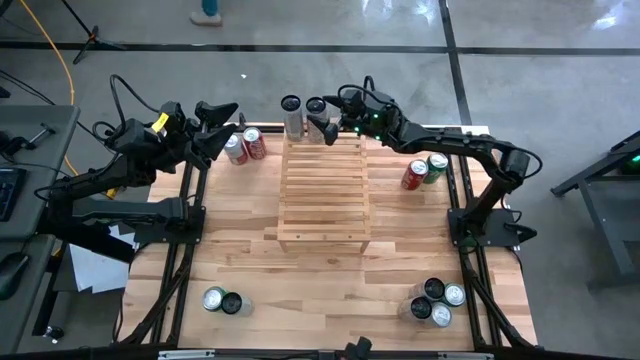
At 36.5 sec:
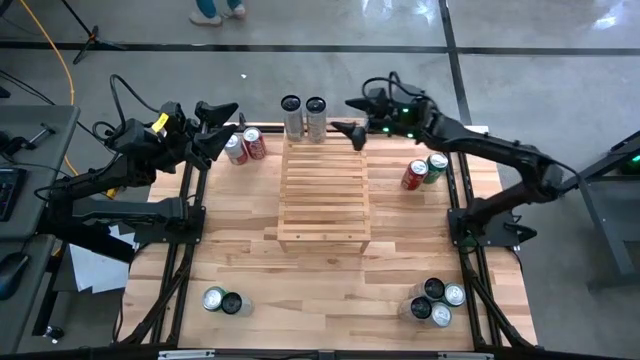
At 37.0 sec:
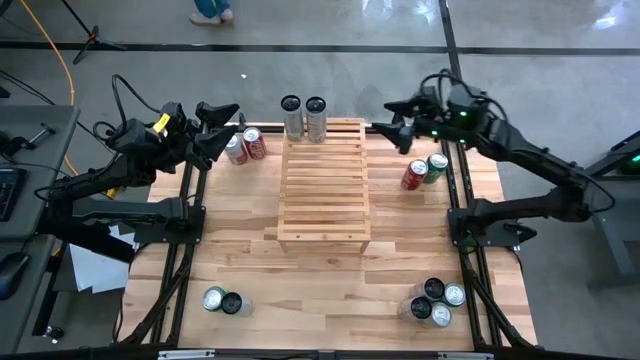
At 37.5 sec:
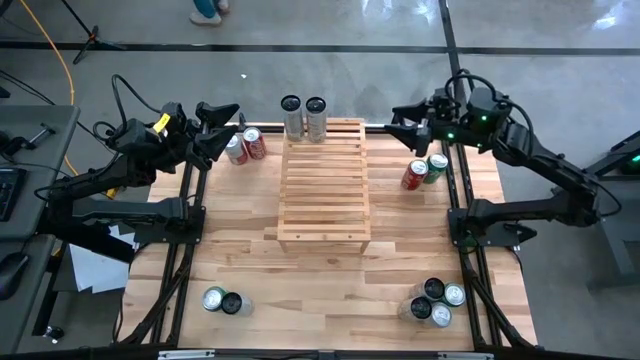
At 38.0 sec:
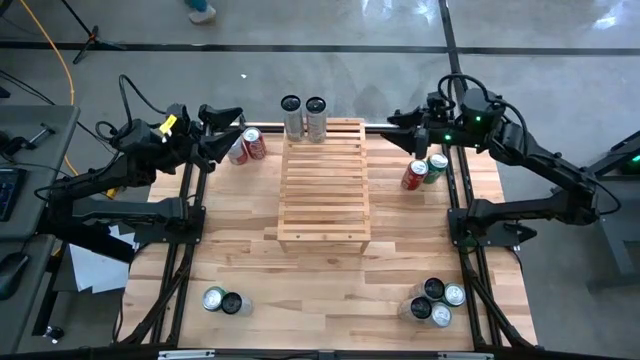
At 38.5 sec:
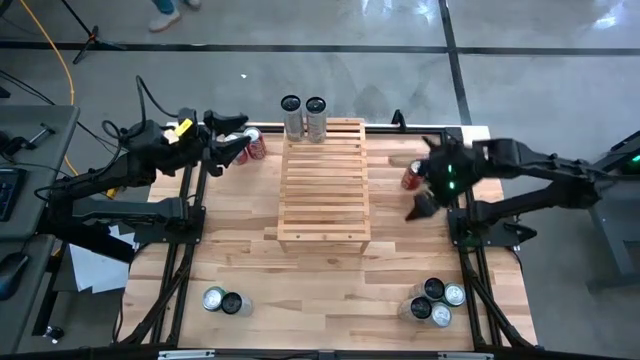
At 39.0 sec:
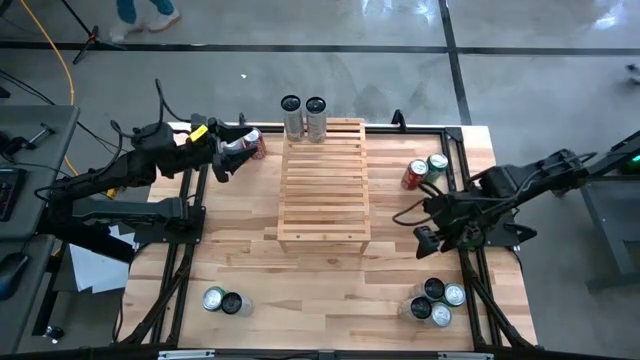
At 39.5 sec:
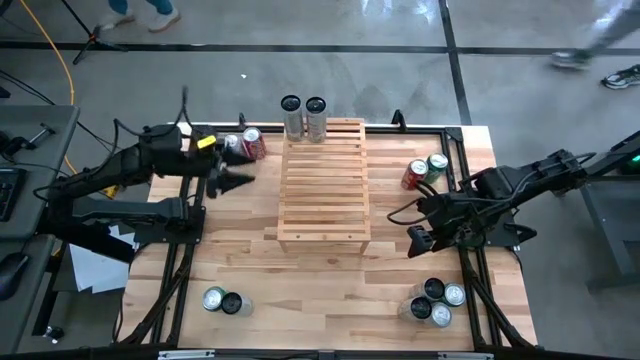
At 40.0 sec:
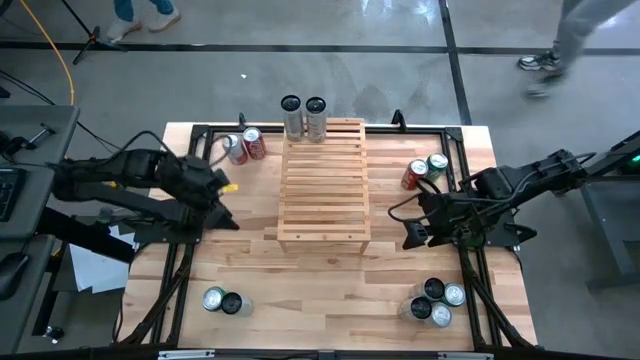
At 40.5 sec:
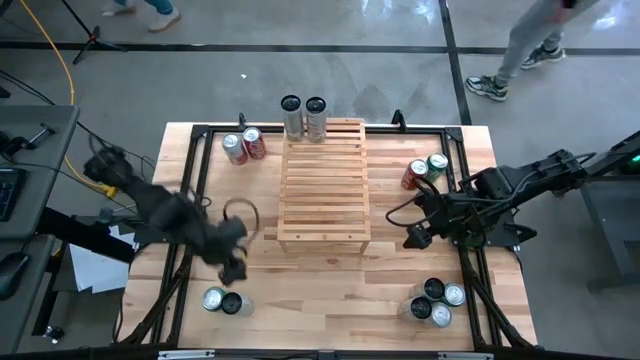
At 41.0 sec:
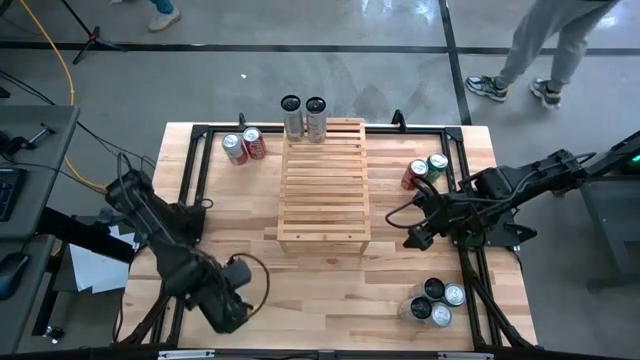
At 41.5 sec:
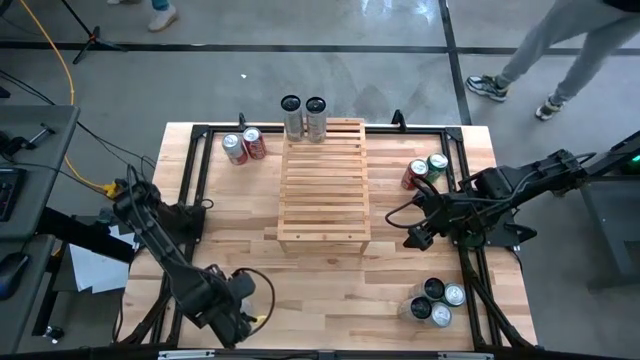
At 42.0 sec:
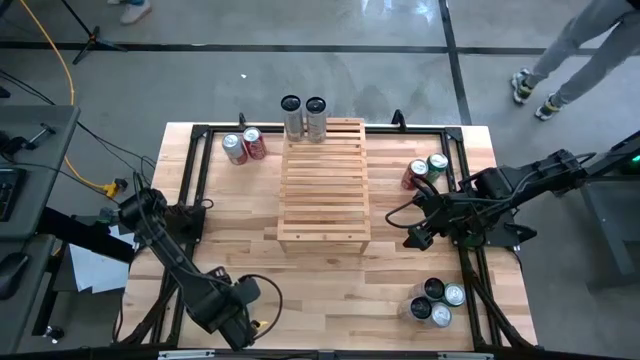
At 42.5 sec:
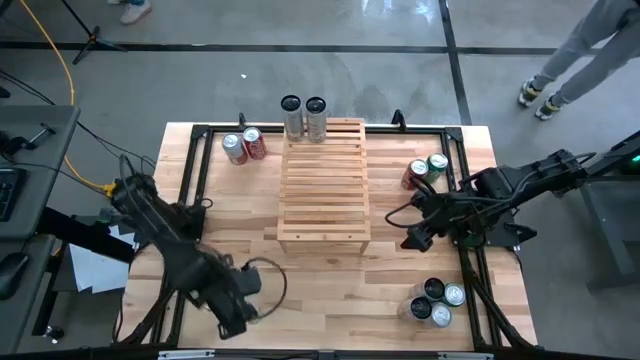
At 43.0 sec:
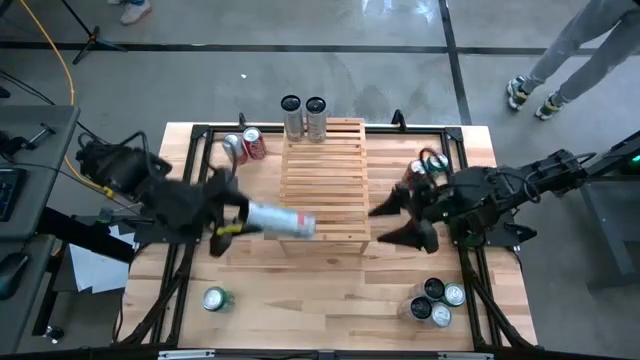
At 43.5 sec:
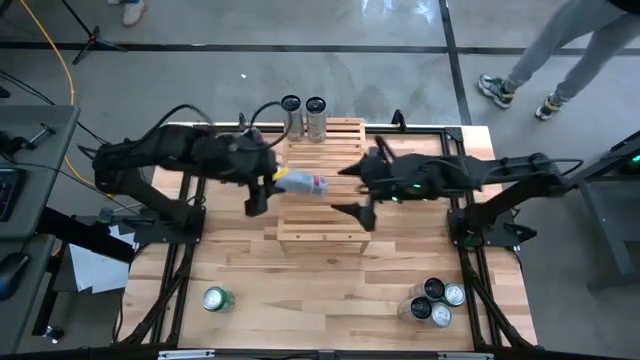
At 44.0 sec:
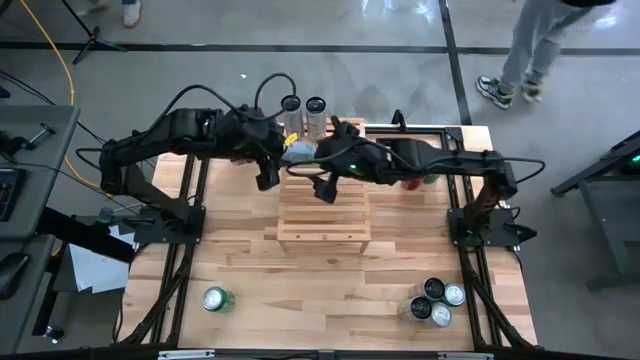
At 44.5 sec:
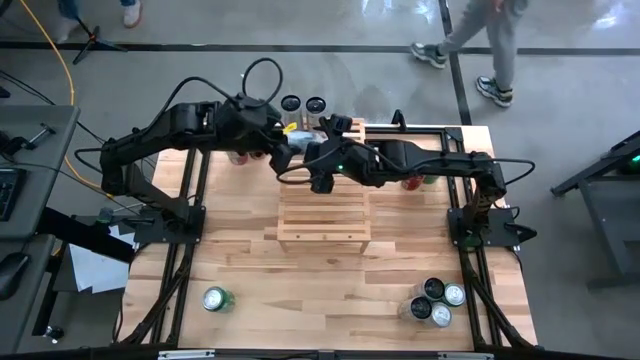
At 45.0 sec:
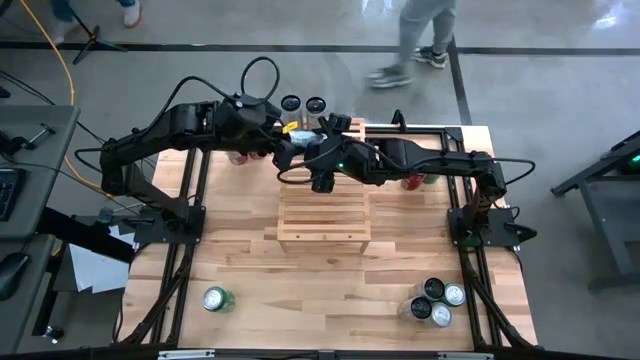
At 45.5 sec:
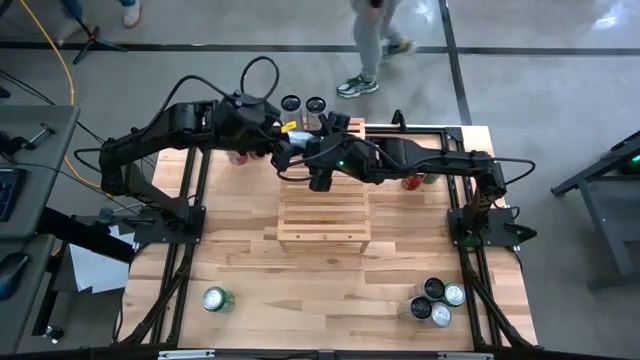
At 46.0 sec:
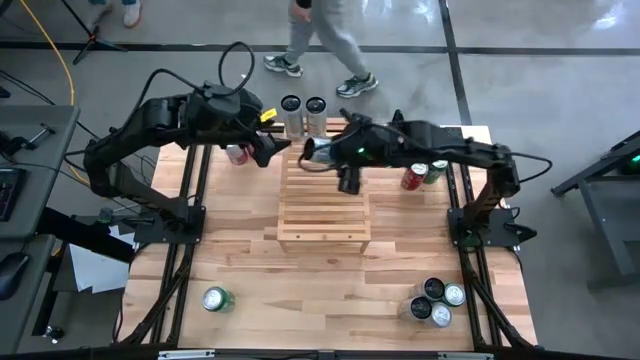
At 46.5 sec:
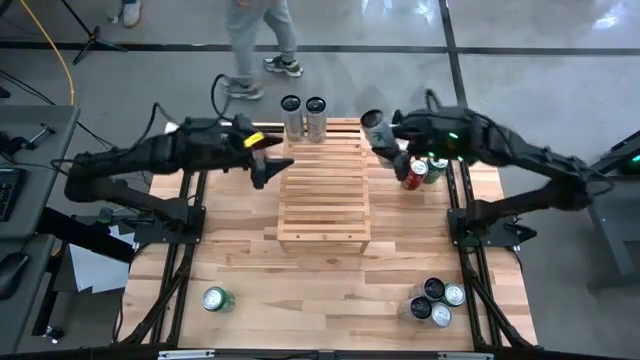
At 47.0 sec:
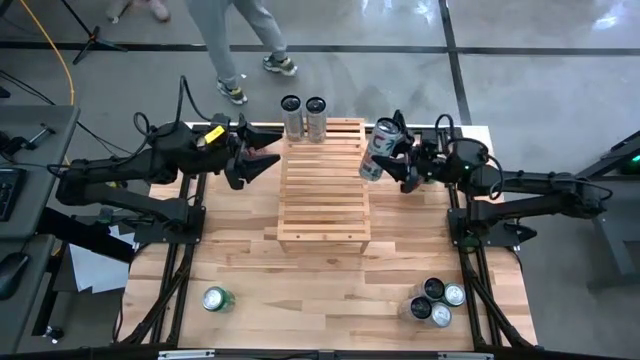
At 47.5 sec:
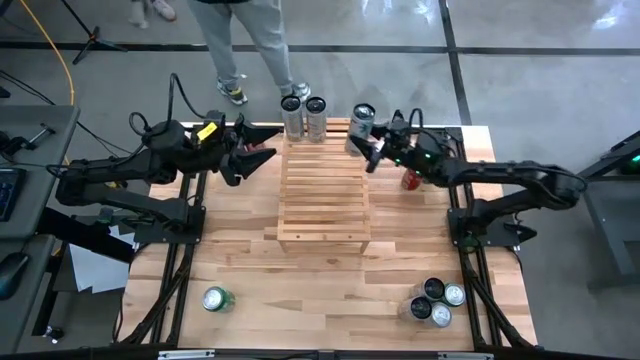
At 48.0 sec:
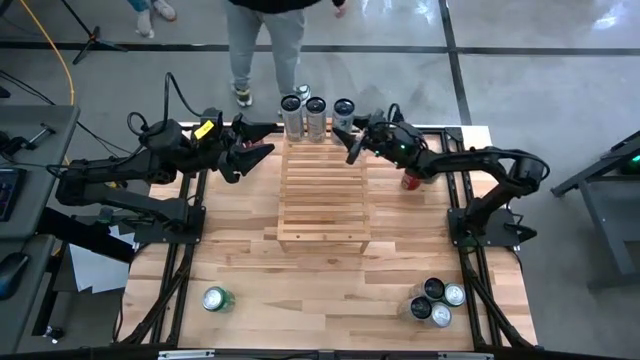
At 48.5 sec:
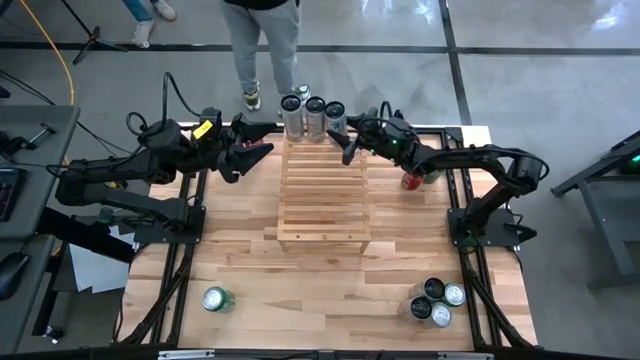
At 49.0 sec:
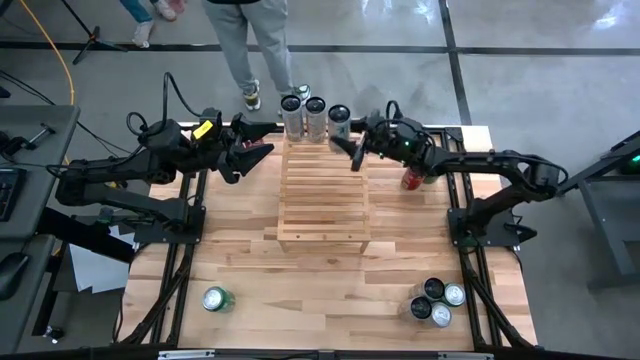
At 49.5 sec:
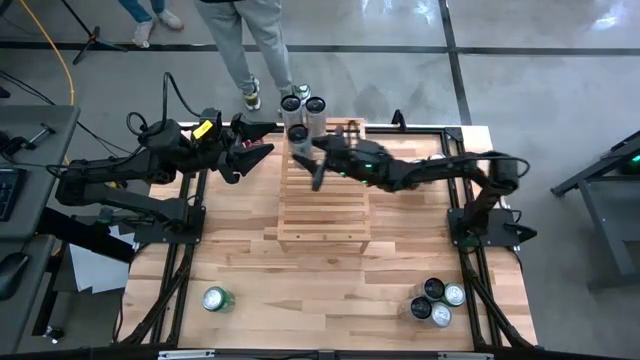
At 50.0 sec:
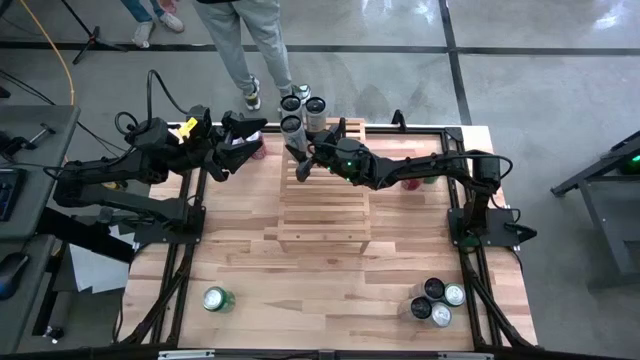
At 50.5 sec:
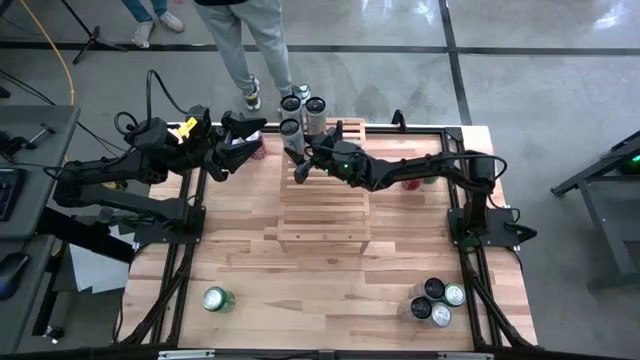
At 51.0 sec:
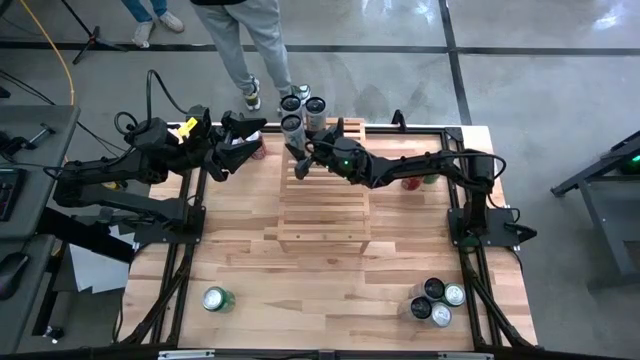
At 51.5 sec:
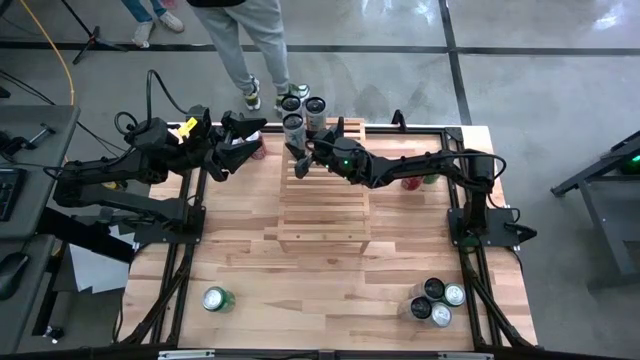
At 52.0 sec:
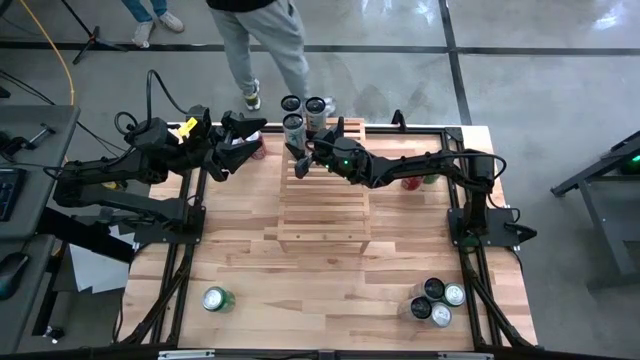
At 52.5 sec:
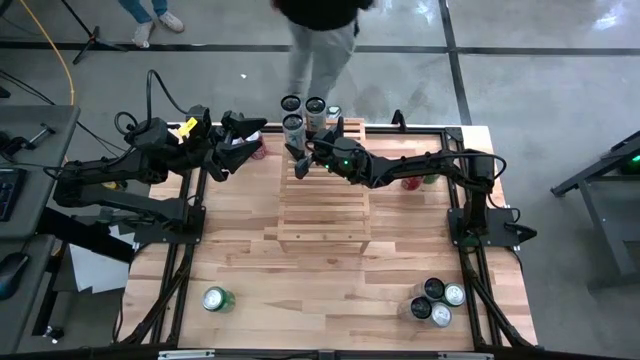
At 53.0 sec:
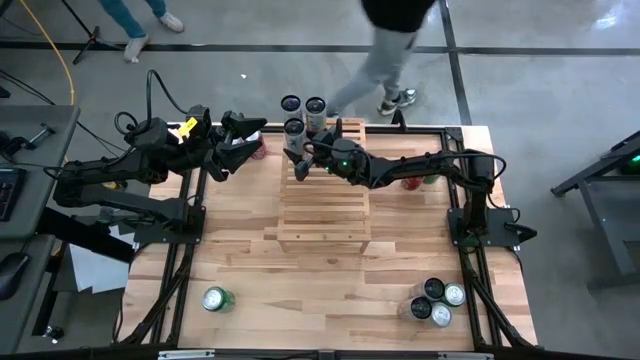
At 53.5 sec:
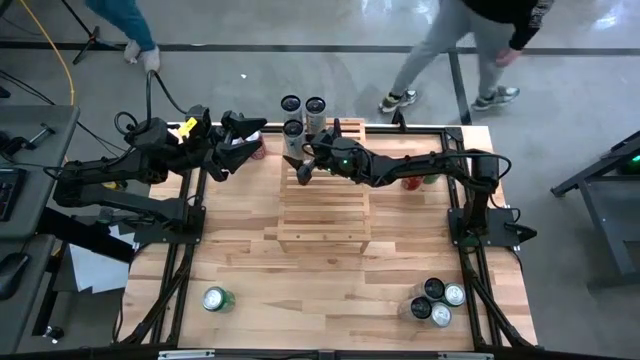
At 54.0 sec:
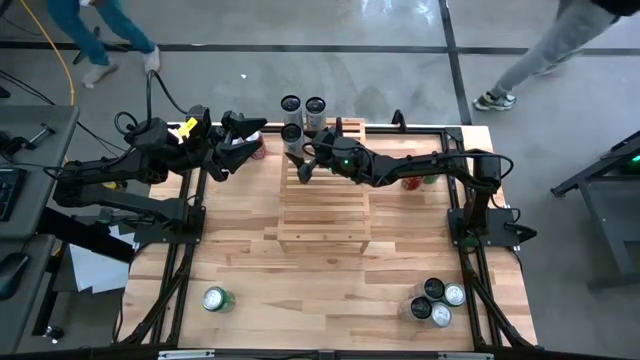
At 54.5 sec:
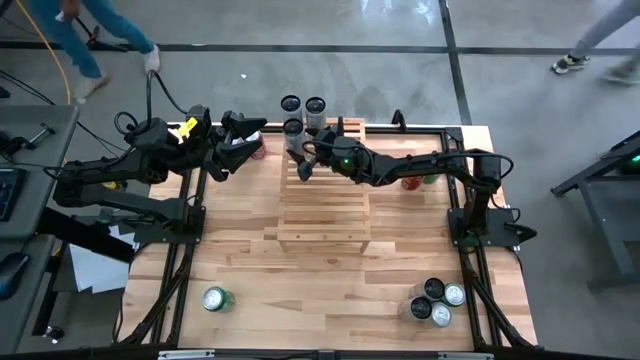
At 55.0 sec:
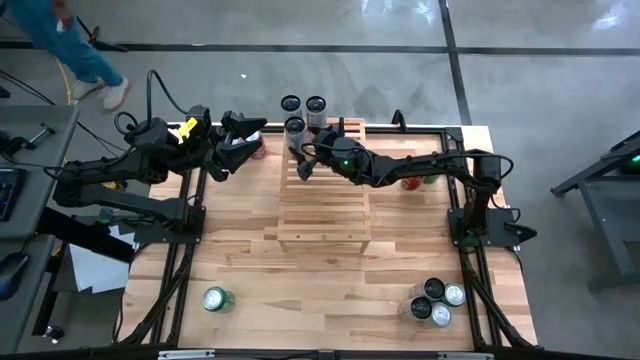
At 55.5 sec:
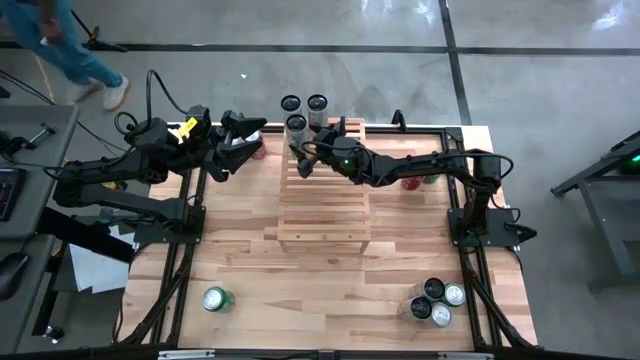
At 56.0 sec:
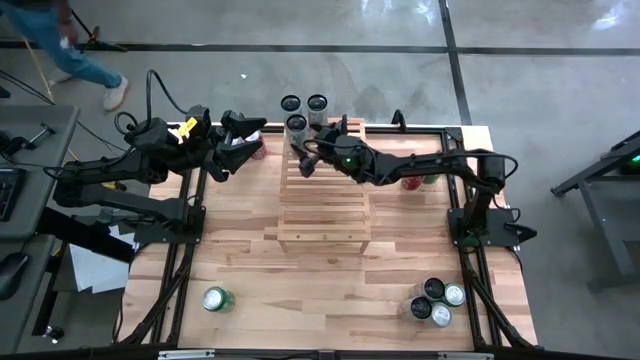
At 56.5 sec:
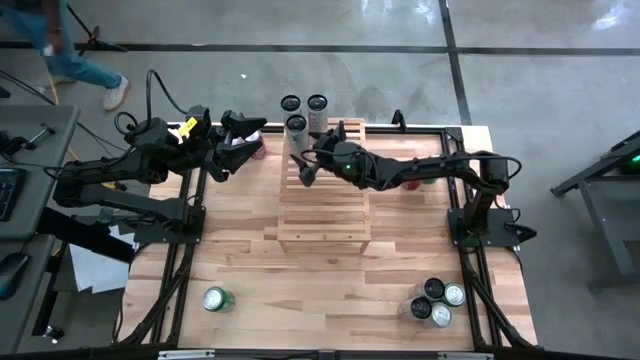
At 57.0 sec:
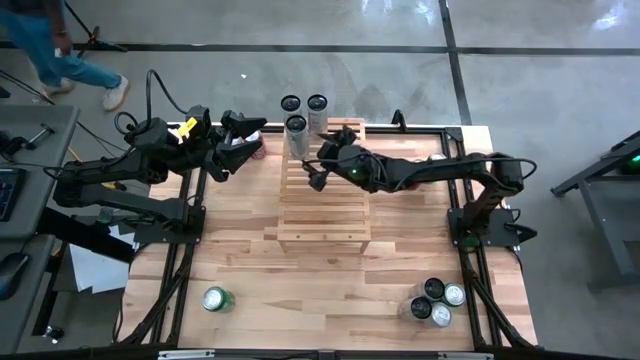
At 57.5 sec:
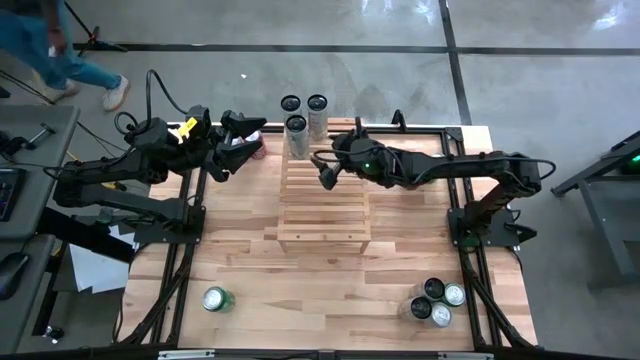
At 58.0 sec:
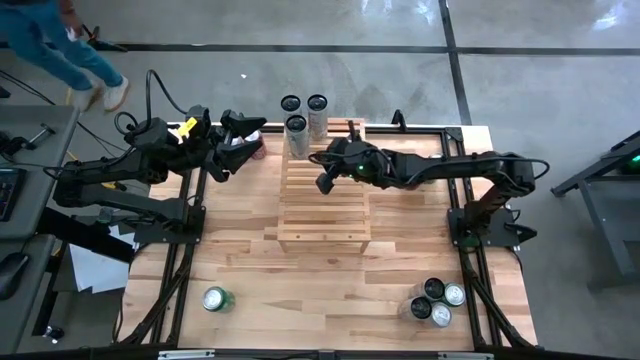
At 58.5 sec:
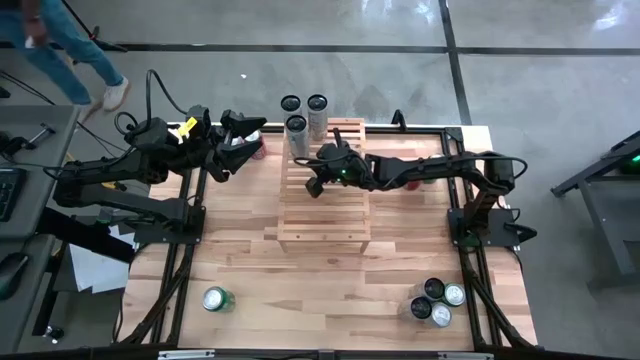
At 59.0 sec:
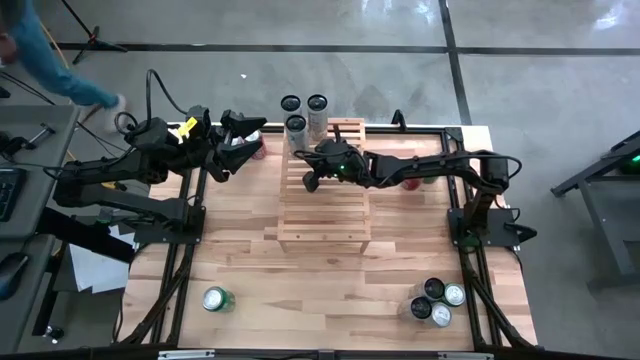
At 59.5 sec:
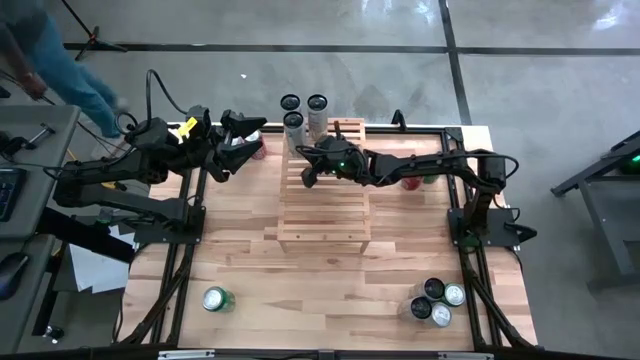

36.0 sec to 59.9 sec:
Task: Place canned beverage on shelf
Put the left white pink soda can on the shelf
